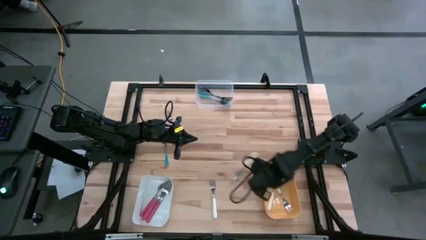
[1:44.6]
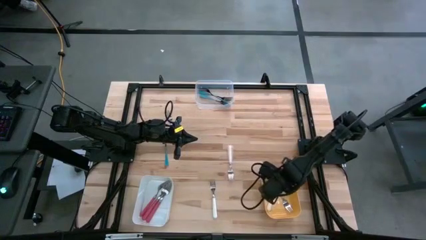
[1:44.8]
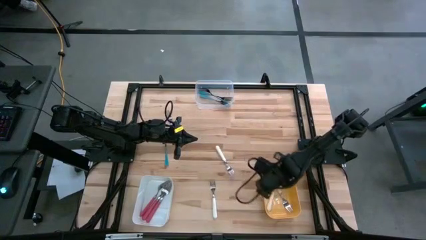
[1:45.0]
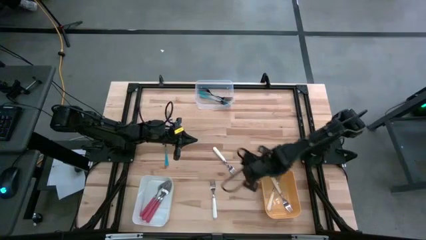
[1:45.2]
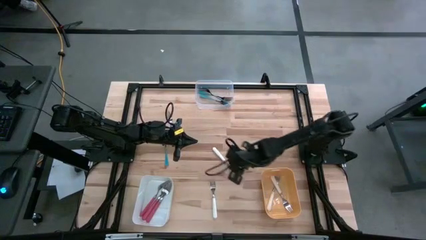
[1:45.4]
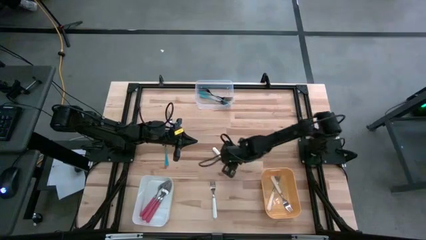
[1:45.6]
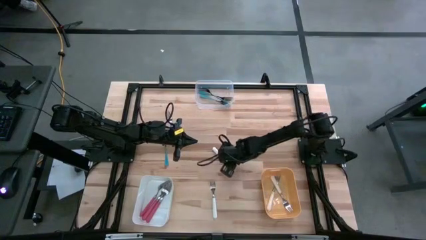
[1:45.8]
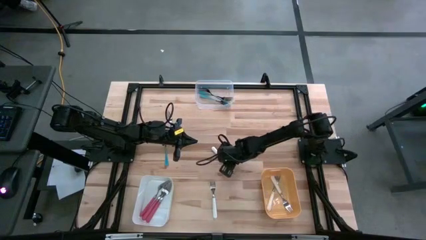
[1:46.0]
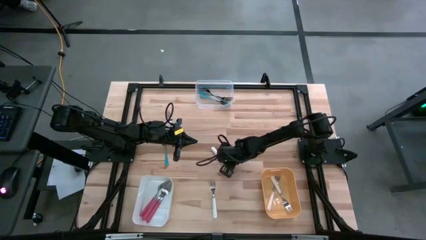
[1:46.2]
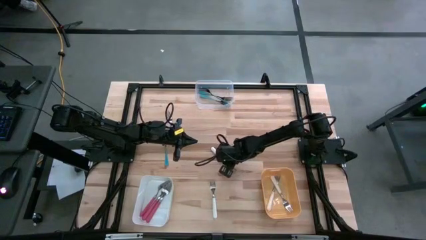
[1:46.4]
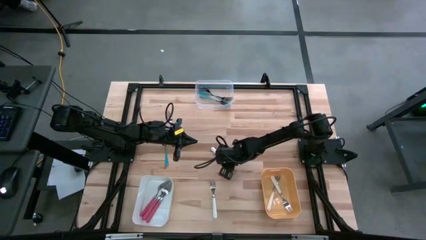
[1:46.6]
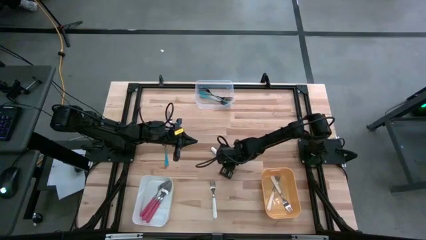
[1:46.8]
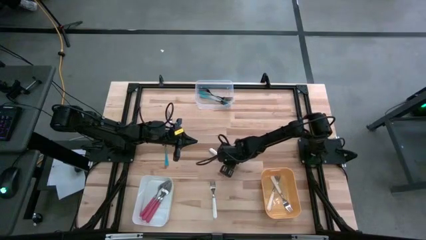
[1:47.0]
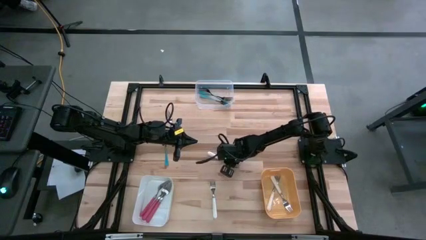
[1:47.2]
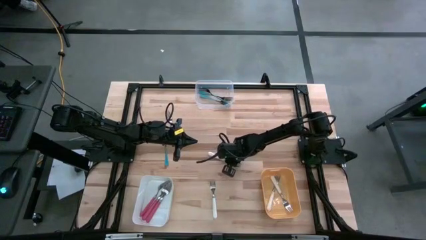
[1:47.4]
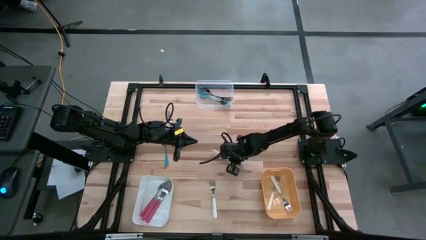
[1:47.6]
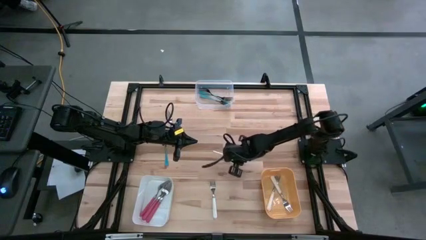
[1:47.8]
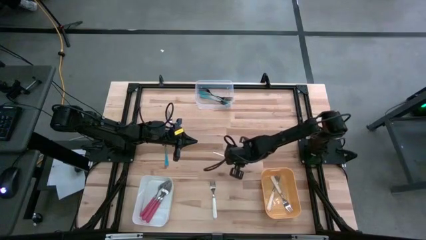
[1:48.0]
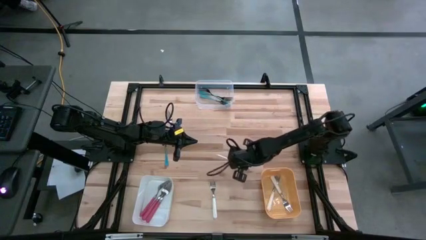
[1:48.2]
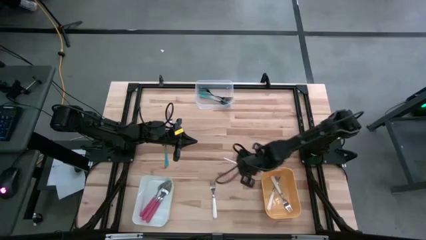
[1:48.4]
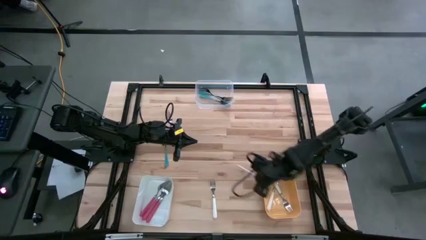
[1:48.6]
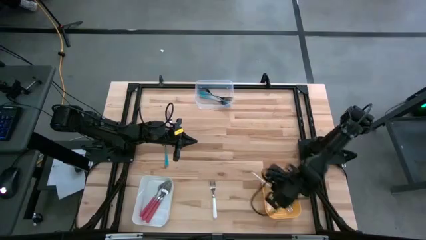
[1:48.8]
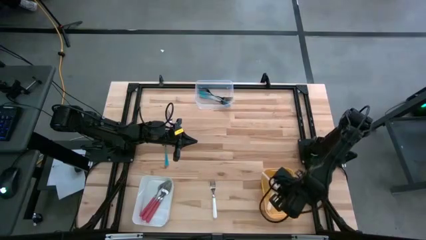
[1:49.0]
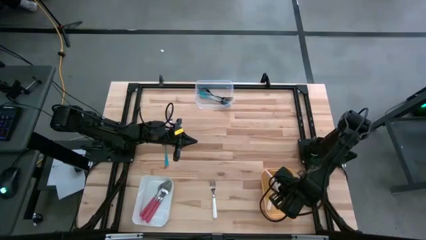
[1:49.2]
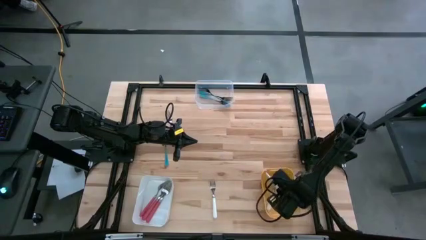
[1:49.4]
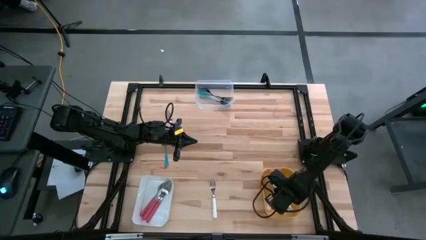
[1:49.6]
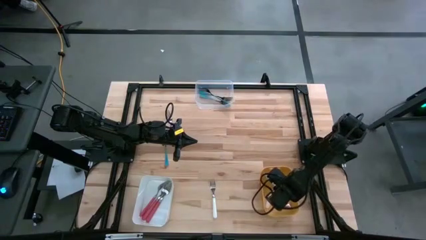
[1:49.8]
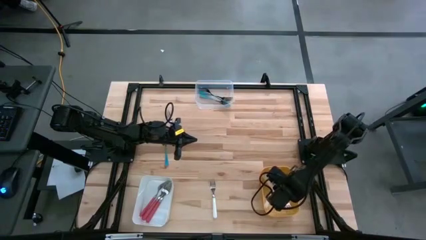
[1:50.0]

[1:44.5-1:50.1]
Task: Sort silverware by color (type)
Put the white fork into the yellow bin

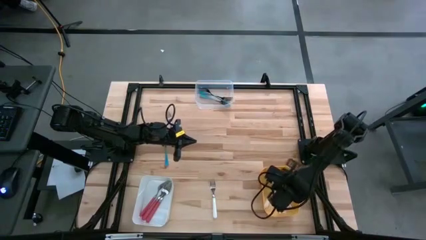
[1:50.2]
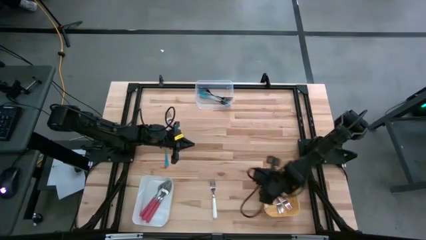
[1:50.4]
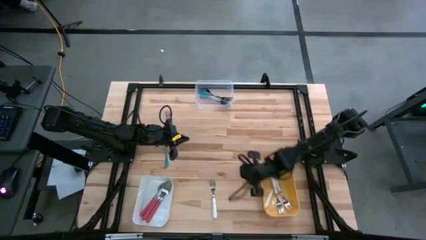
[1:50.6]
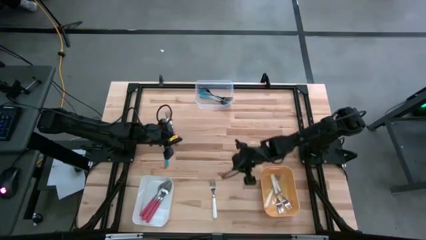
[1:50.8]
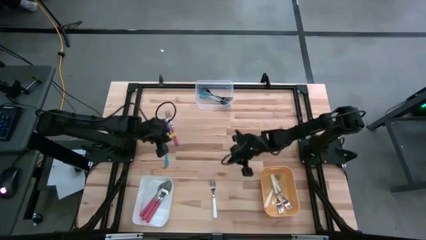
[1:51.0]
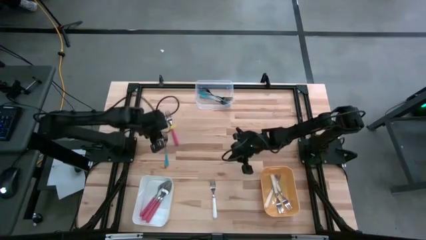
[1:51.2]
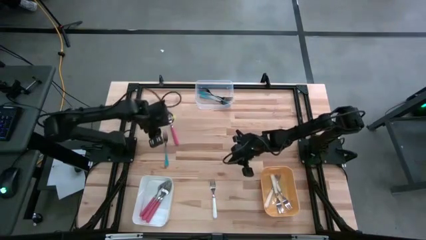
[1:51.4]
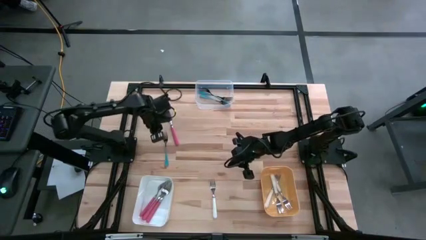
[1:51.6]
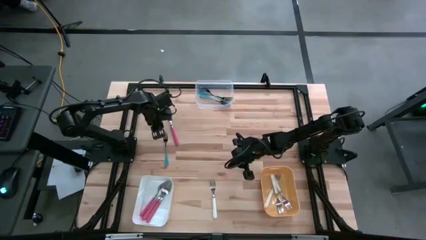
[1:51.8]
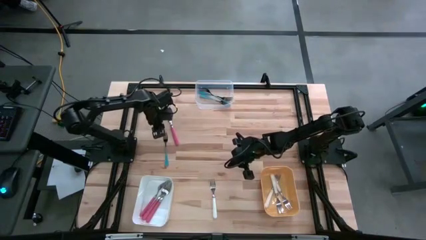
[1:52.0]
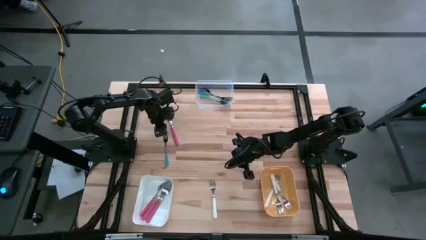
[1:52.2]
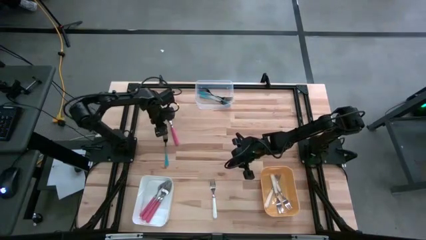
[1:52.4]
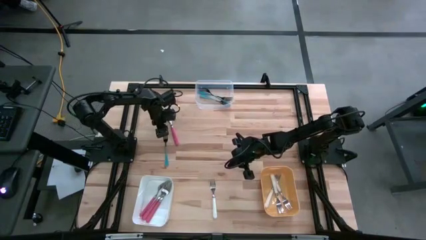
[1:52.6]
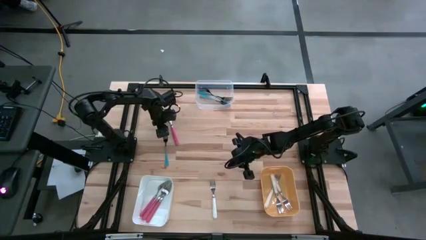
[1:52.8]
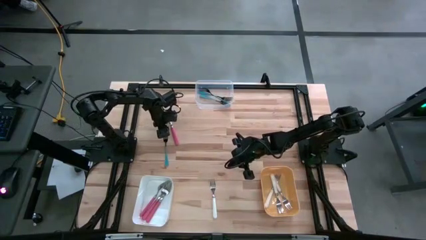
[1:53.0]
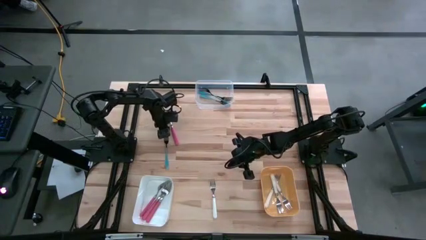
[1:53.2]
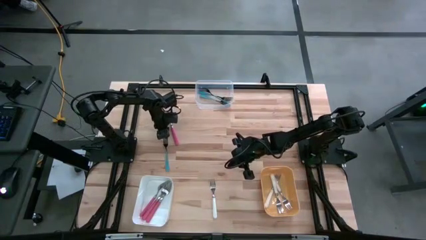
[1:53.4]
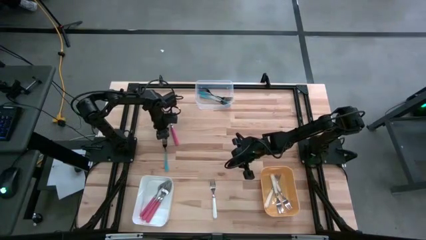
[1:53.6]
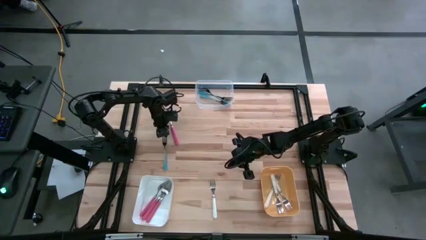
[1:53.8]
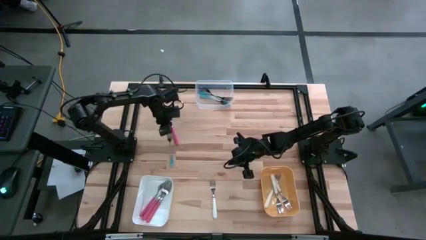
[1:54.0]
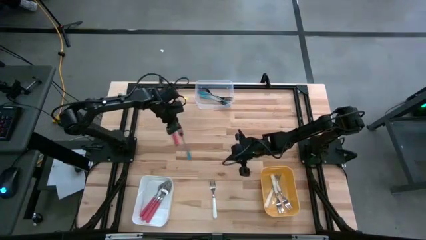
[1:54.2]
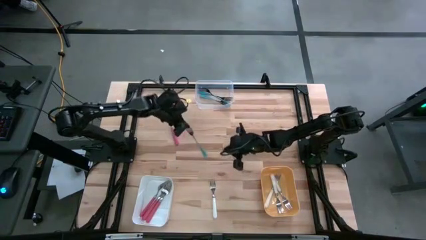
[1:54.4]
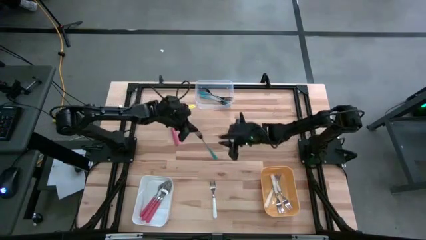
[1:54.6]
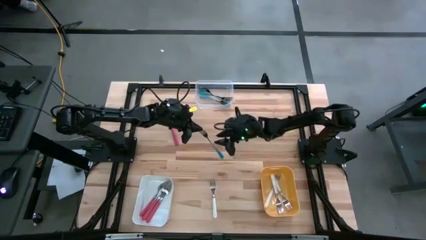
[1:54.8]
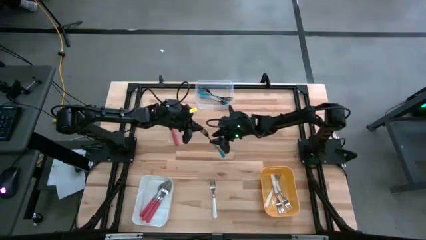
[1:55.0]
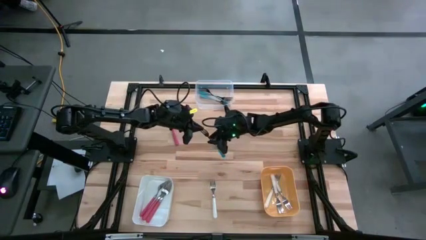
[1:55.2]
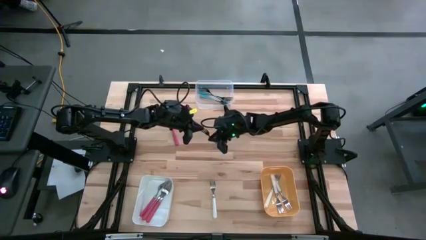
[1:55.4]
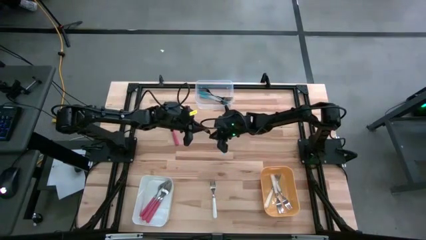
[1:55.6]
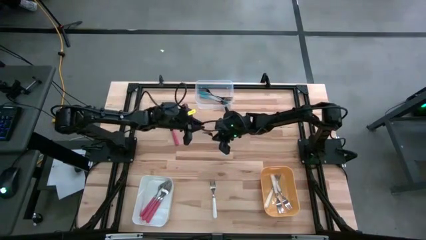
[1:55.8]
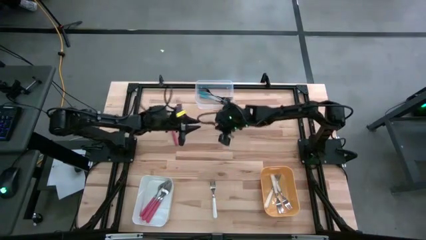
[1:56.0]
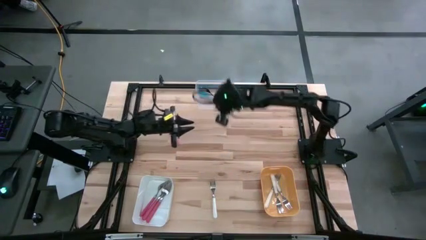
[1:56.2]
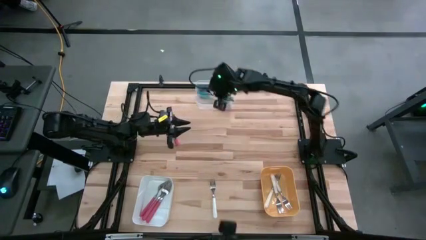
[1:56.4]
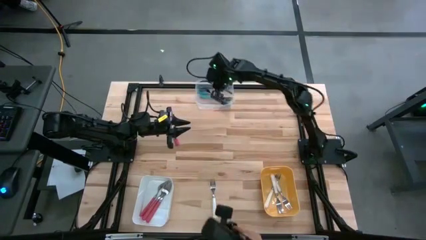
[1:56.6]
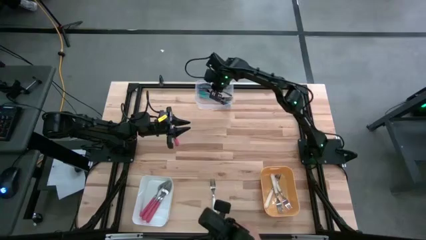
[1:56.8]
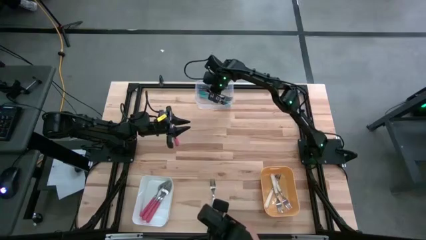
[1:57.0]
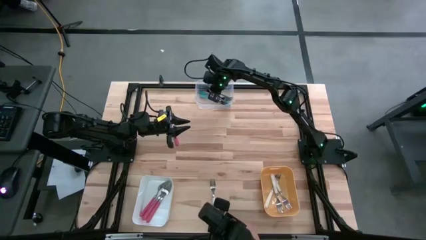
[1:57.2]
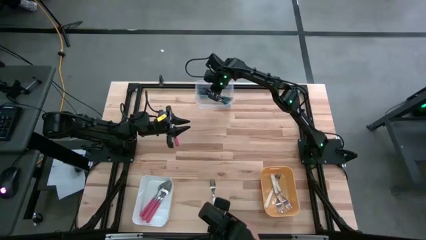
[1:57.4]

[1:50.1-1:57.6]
Put the blue fork into the transparent bin

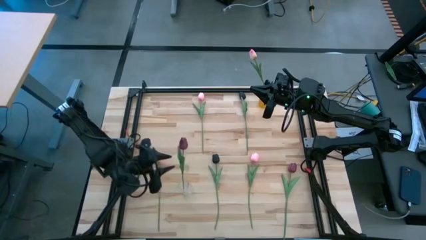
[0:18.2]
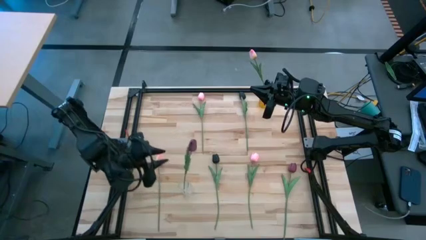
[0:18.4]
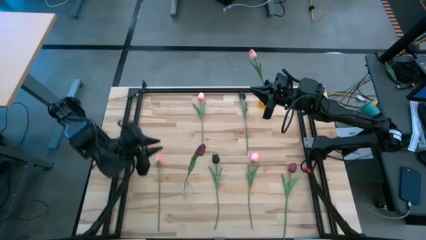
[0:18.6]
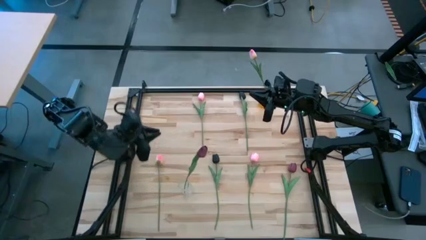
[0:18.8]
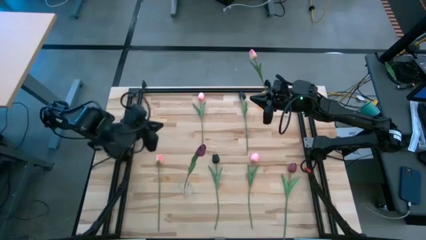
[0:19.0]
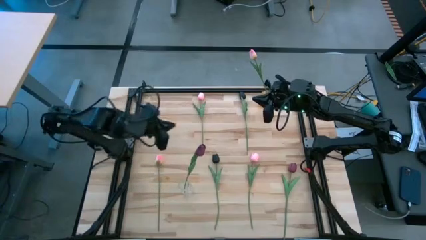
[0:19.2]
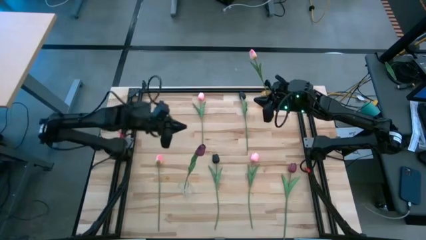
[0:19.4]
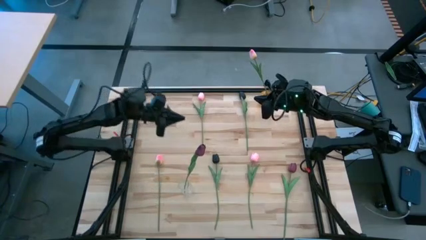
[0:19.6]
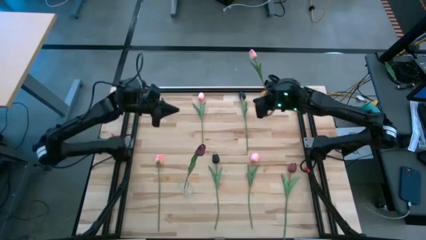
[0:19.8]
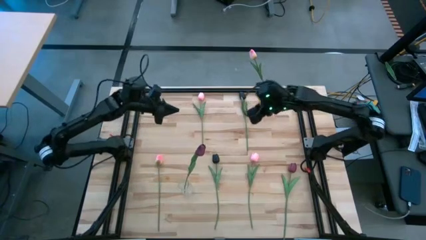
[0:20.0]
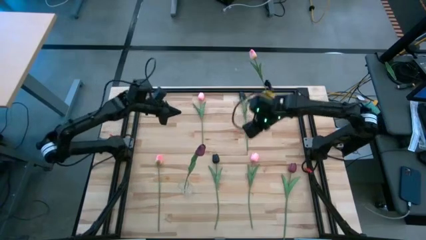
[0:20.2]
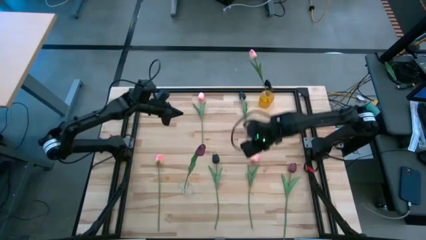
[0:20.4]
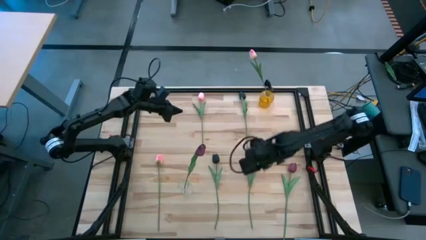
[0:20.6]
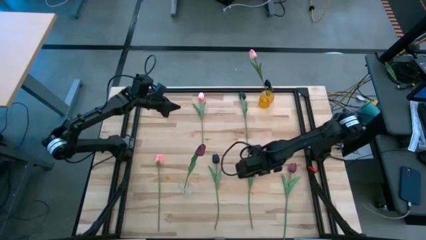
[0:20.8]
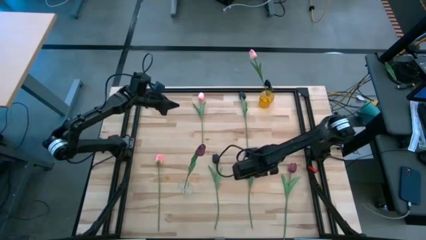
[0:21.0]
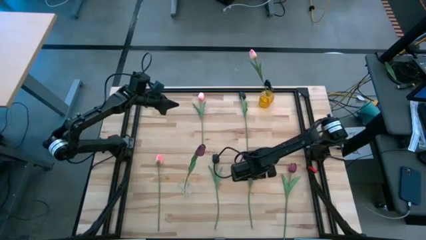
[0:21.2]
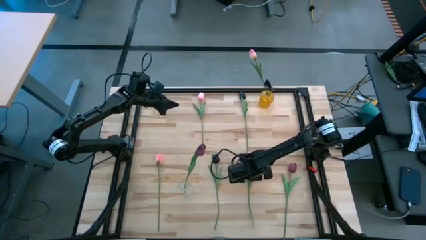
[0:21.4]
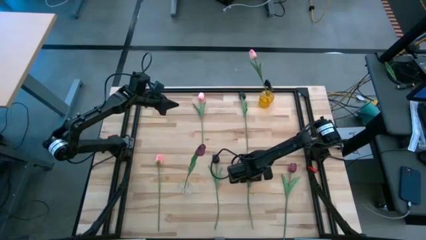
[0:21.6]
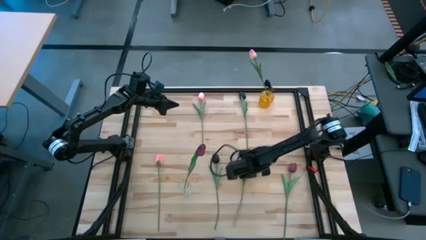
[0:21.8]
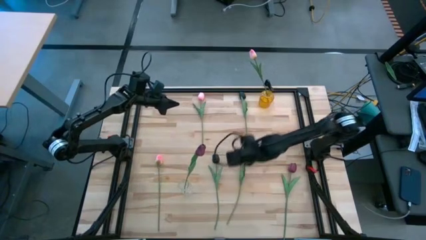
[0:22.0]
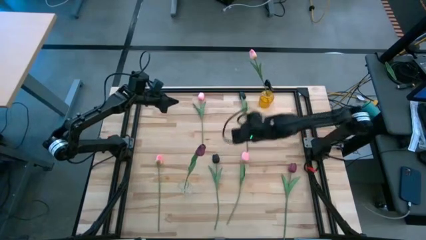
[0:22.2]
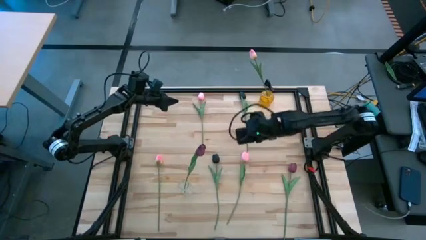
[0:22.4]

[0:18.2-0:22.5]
Task: Sort flowers into vase by color
Put the bottom center pink tulip flower into the yellow crystal vase
